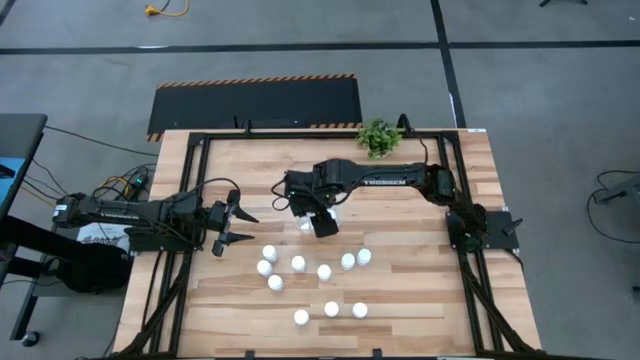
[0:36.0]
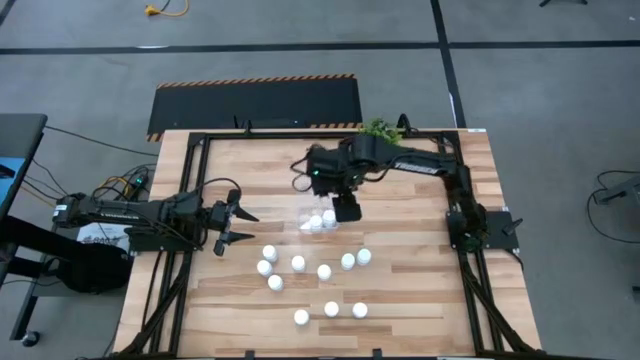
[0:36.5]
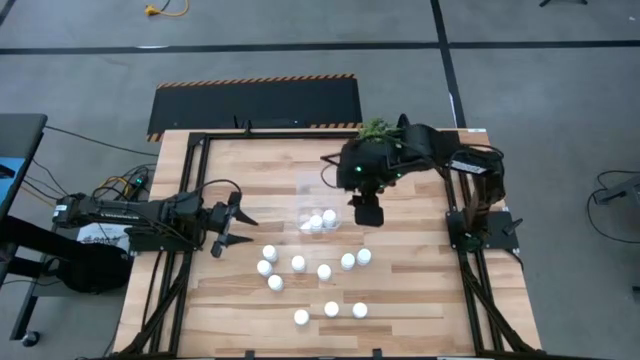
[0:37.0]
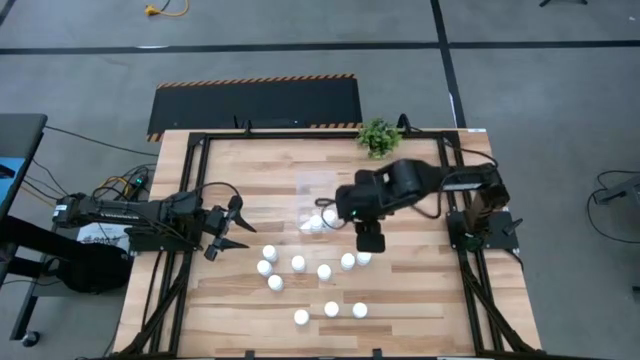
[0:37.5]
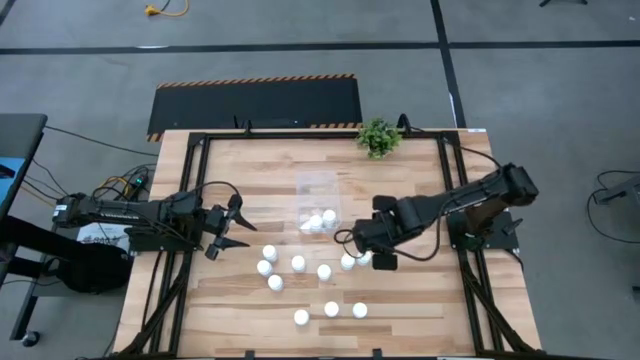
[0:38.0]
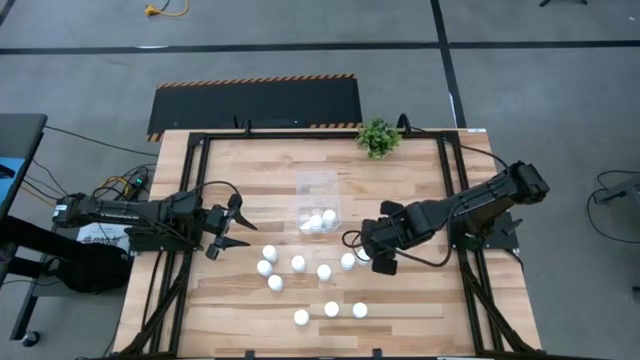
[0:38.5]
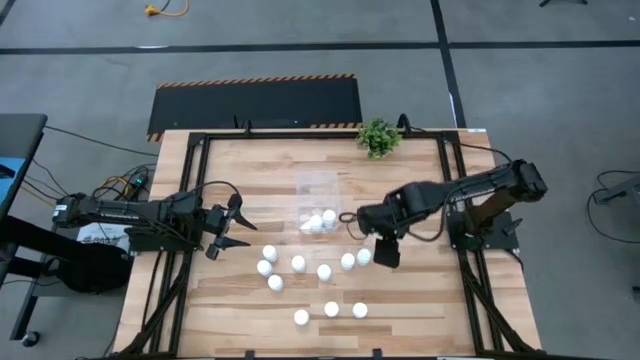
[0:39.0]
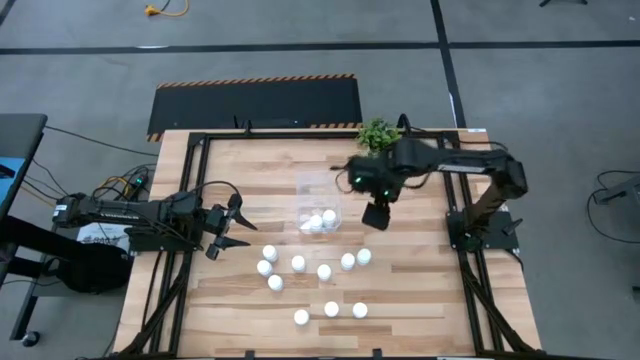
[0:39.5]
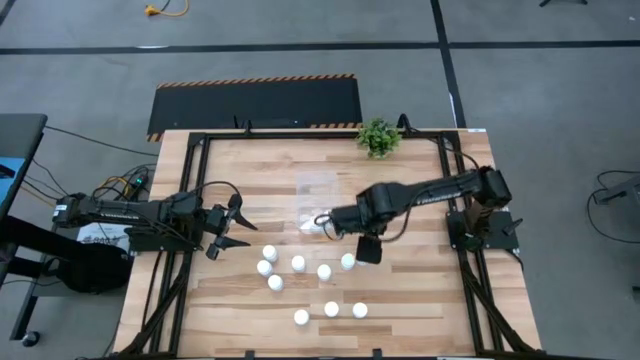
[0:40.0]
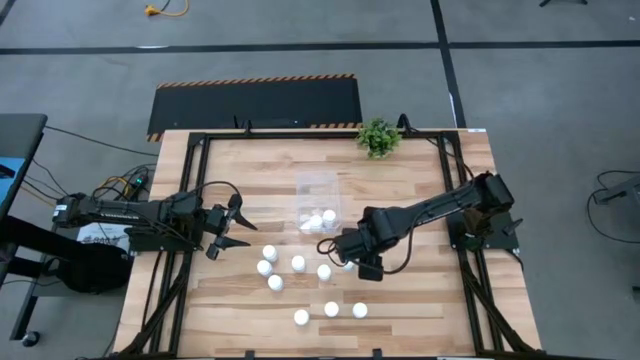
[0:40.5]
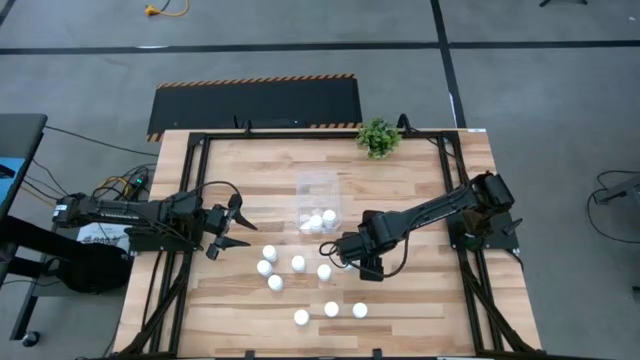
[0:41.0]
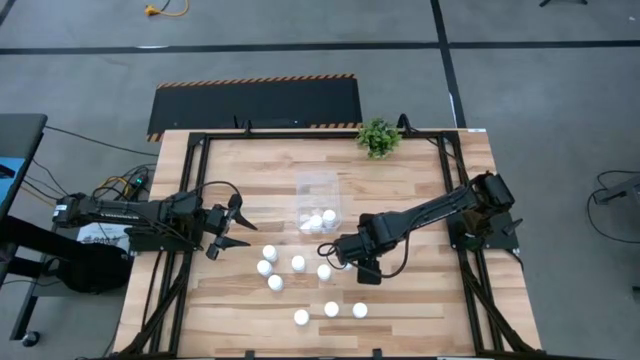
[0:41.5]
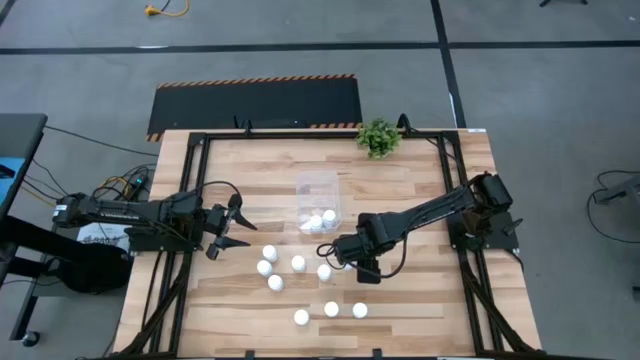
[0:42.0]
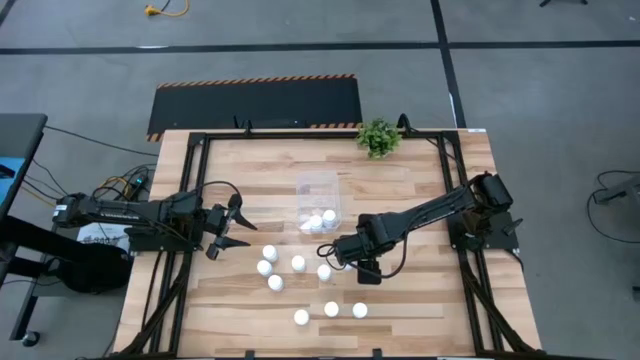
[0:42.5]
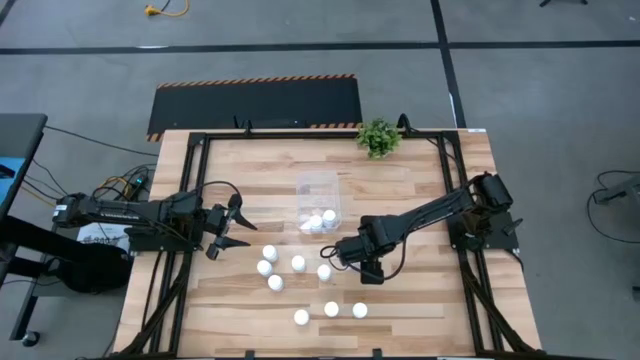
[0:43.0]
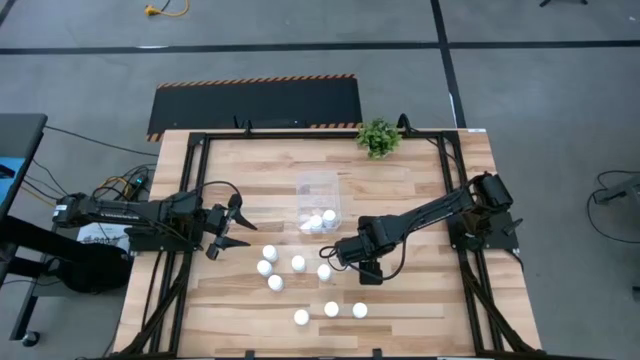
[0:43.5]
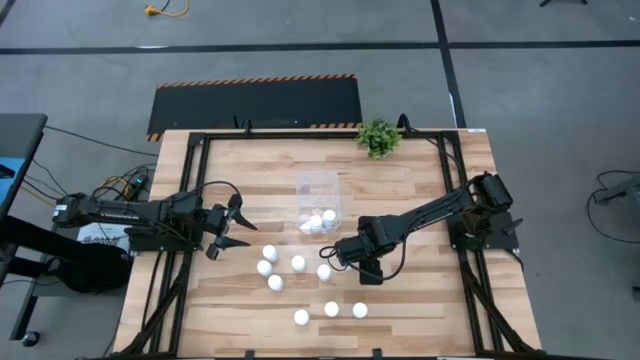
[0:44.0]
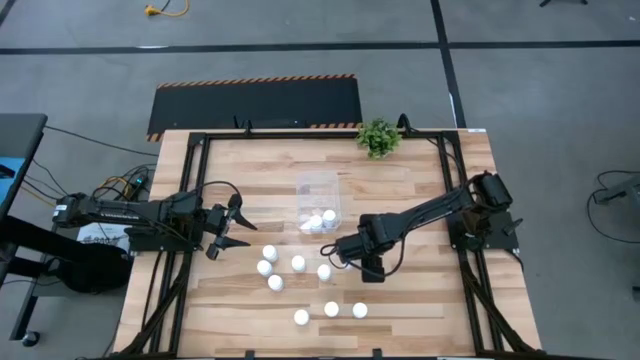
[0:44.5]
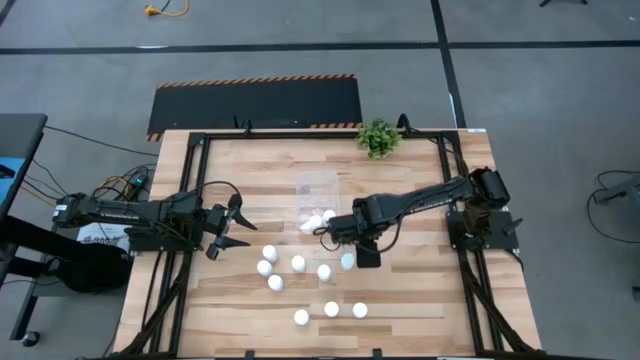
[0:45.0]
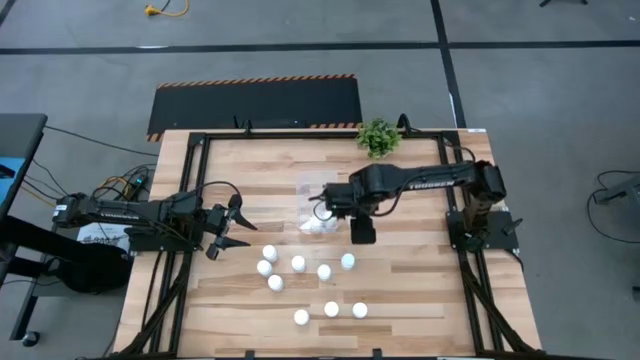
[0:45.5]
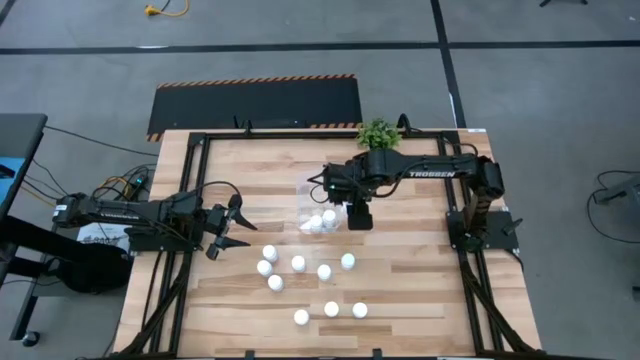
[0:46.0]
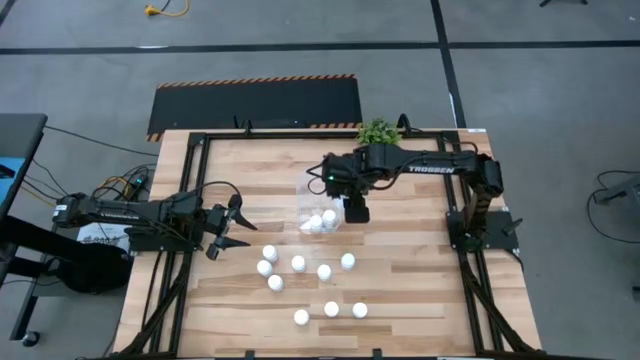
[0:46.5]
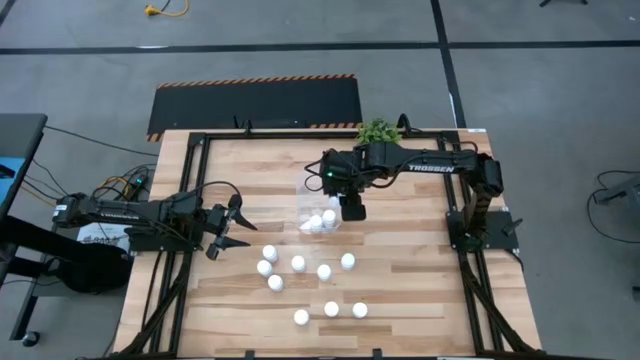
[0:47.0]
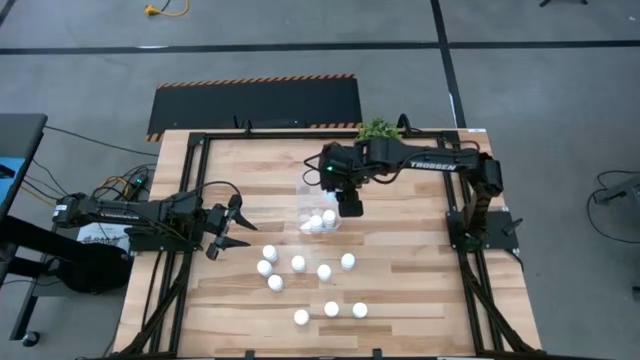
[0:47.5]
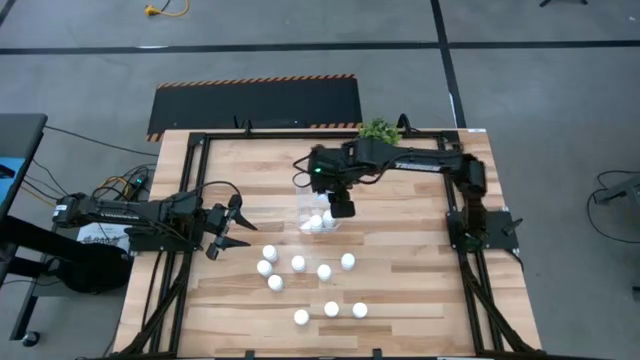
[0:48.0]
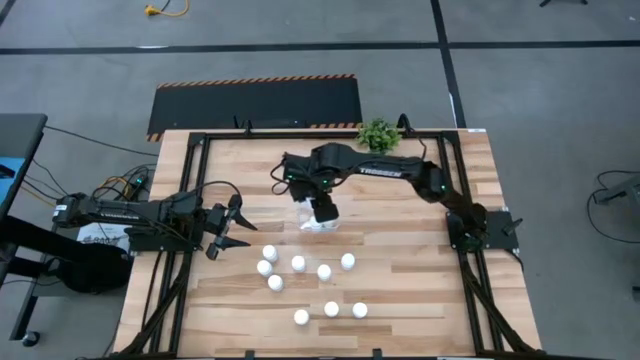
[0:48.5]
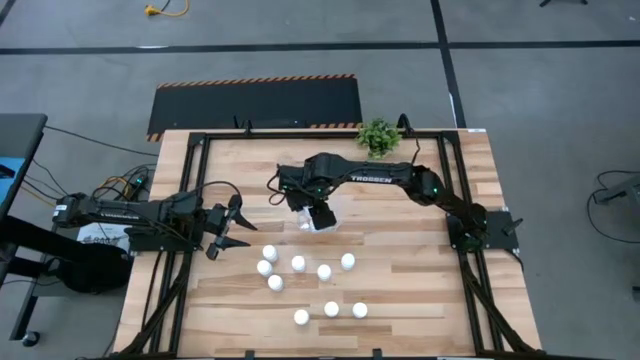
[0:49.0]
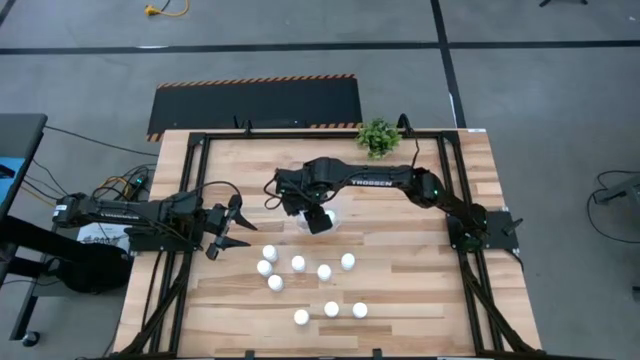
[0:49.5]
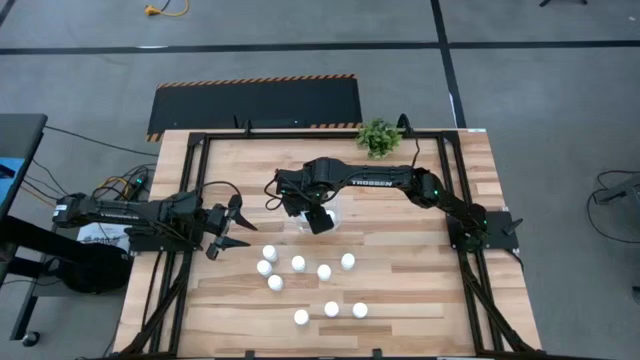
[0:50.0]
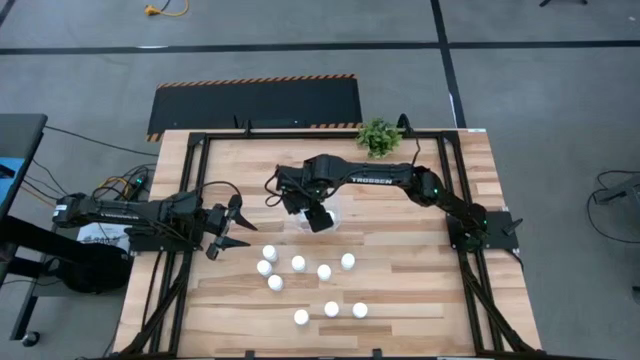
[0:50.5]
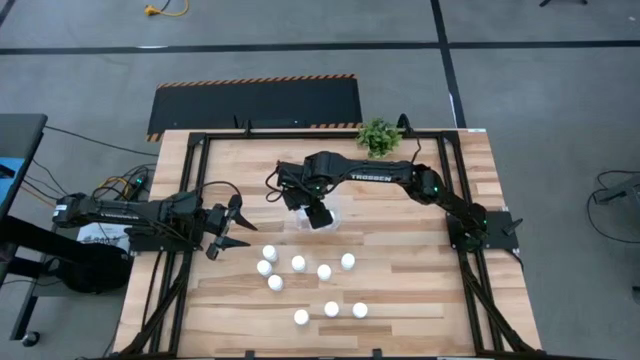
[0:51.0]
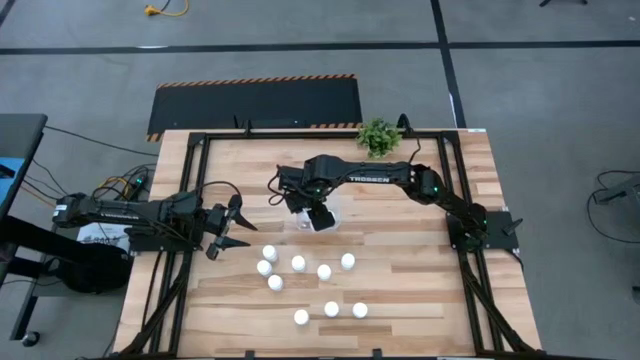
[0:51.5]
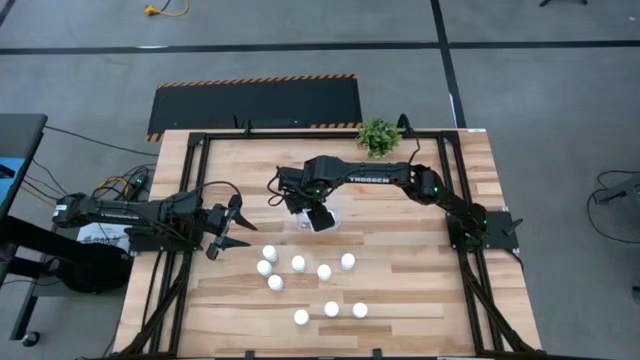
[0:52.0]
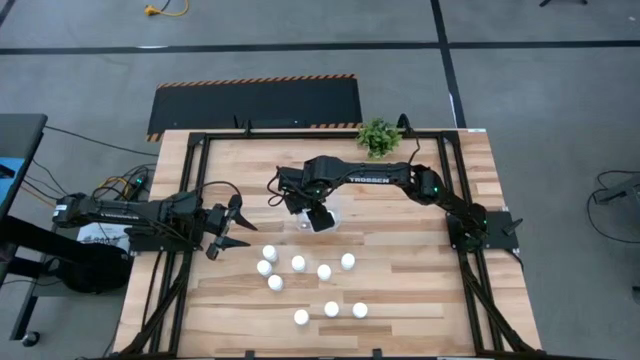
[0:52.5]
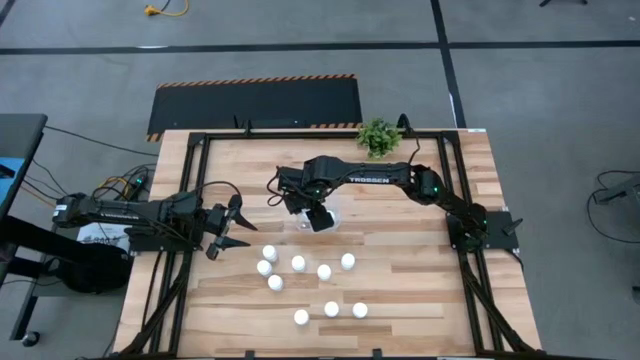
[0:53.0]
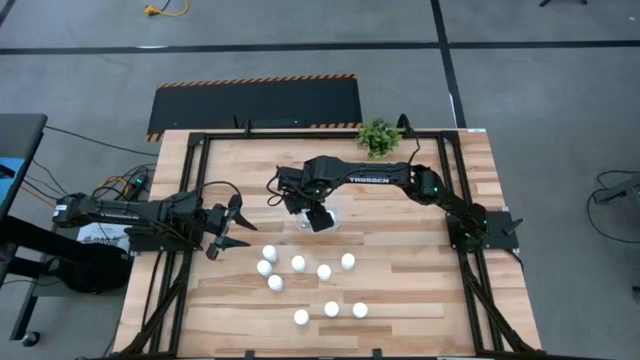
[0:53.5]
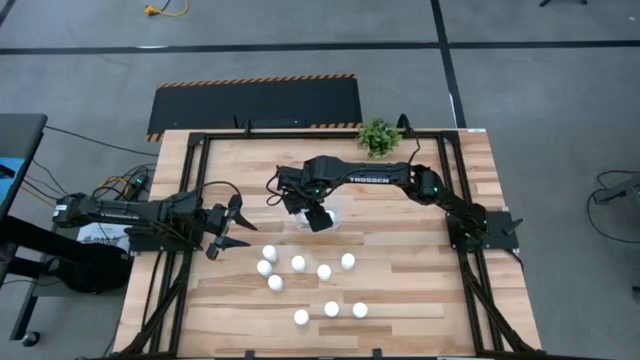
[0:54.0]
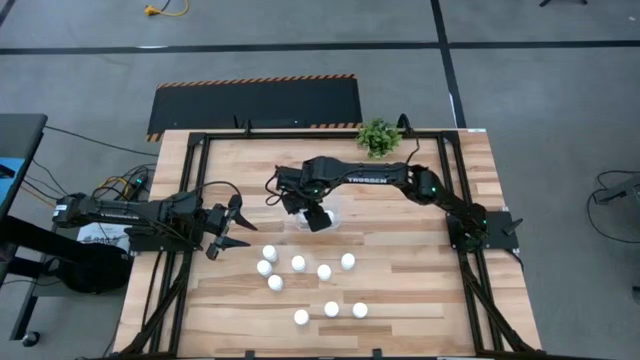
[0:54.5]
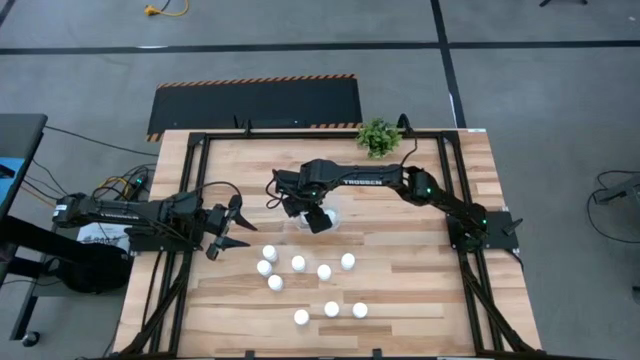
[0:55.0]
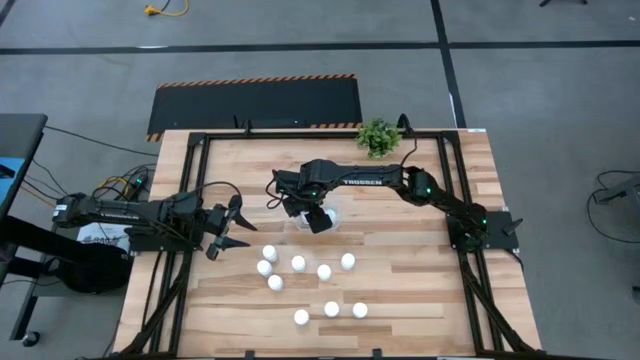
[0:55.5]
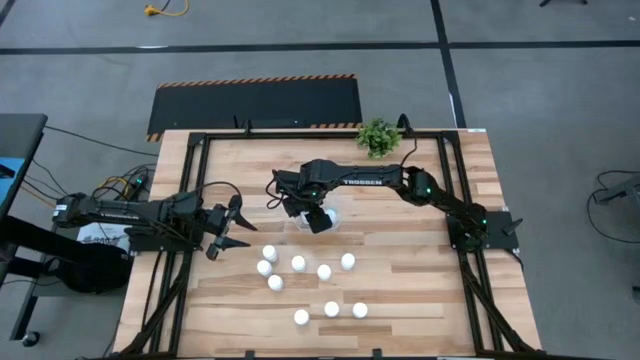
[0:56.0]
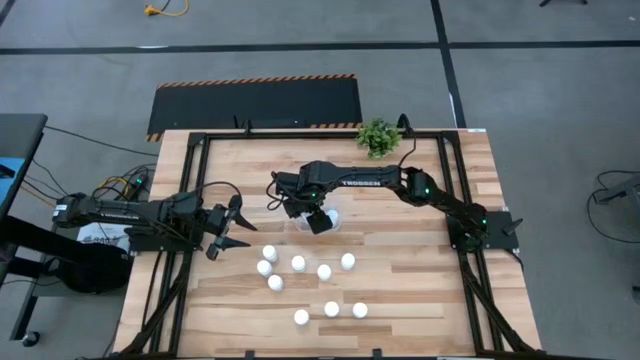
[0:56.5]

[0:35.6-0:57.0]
Task: Pick and place pill bottles into a basket
Put the pill bottles into the container

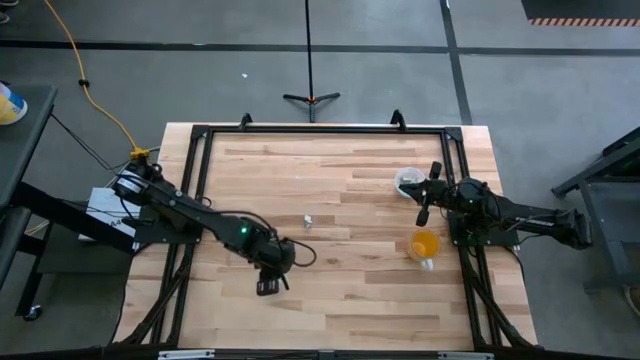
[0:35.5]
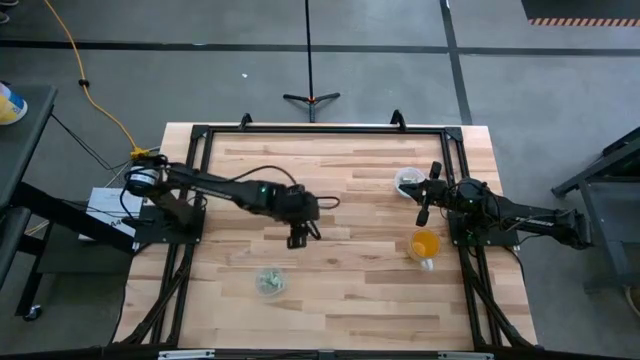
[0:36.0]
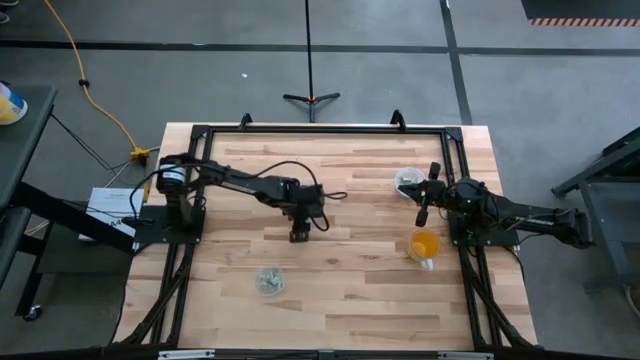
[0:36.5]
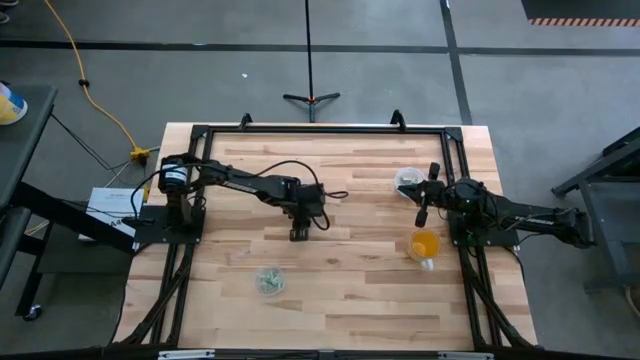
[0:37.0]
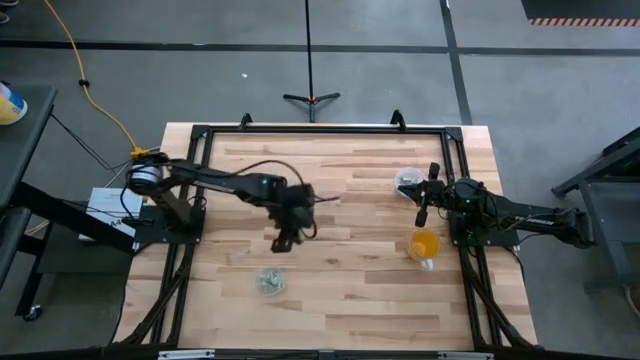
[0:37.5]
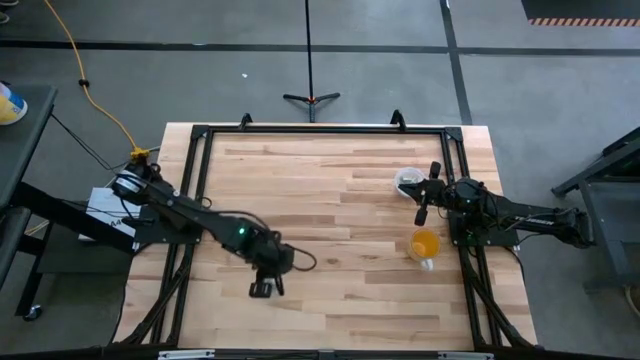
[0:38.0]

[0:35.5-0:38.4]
Task: Pick and place Stevia / Truvia into bins
Put the stevia packet into the square container
